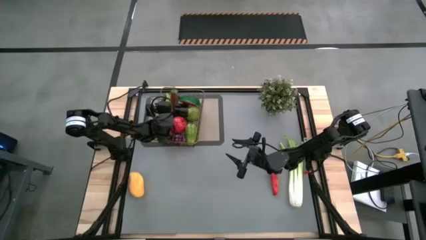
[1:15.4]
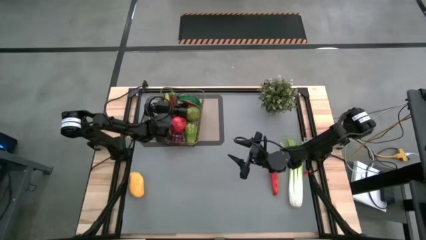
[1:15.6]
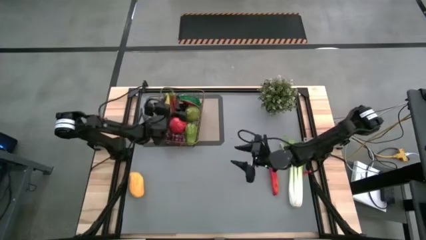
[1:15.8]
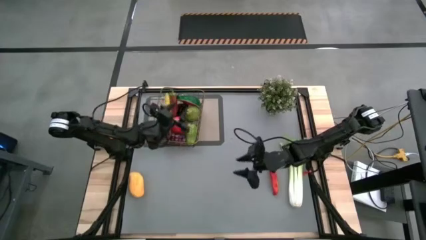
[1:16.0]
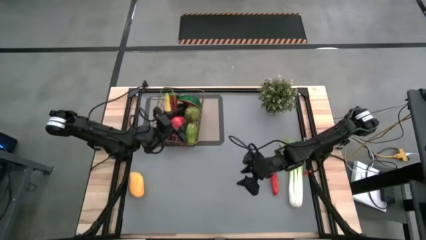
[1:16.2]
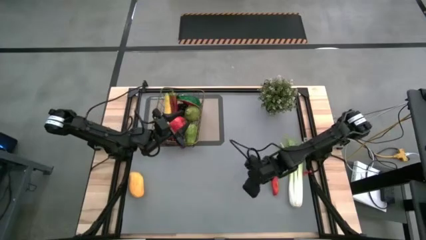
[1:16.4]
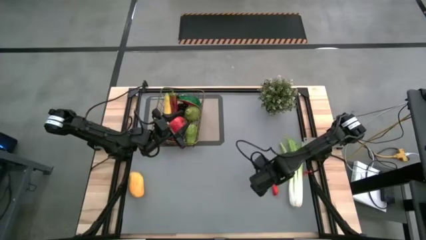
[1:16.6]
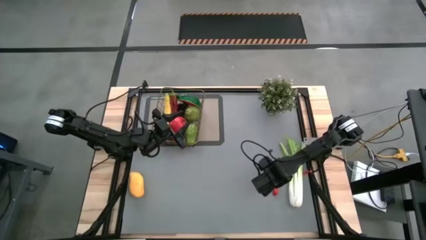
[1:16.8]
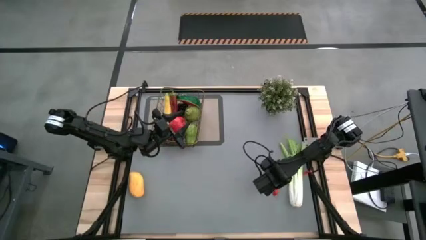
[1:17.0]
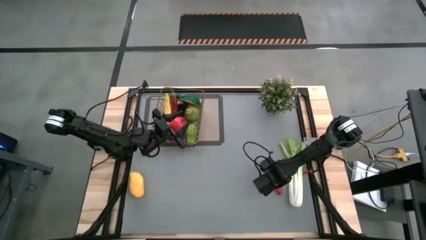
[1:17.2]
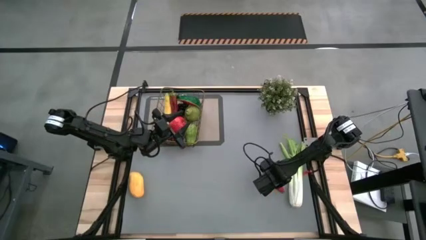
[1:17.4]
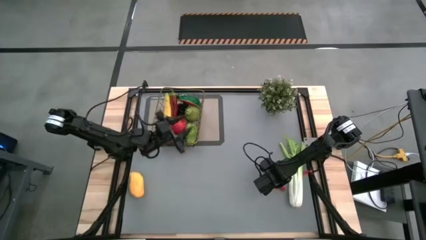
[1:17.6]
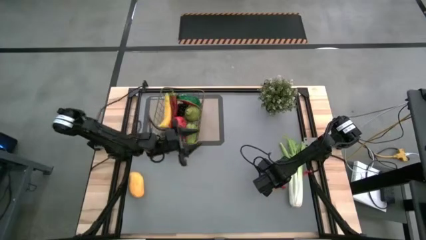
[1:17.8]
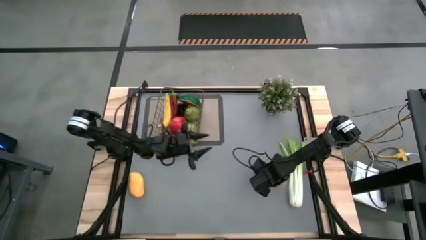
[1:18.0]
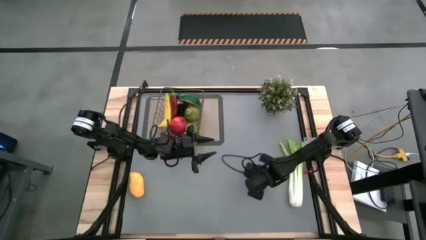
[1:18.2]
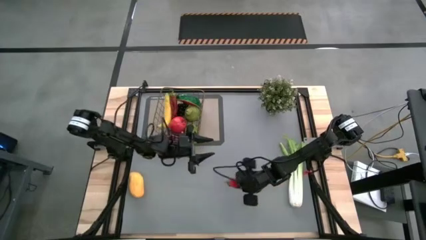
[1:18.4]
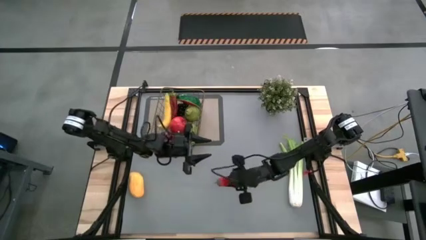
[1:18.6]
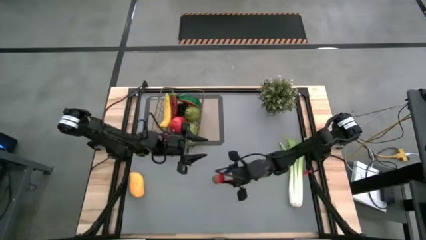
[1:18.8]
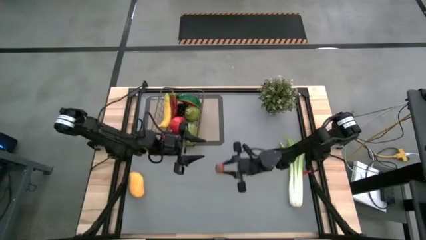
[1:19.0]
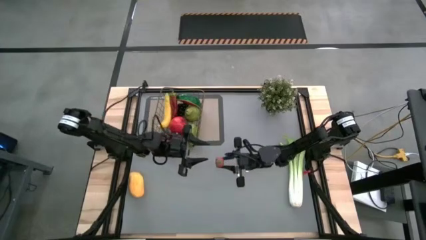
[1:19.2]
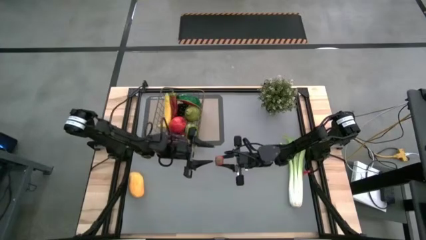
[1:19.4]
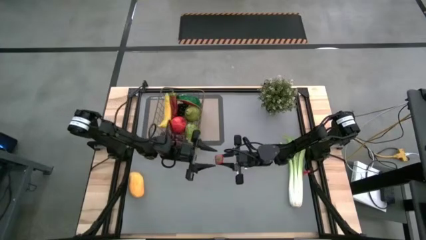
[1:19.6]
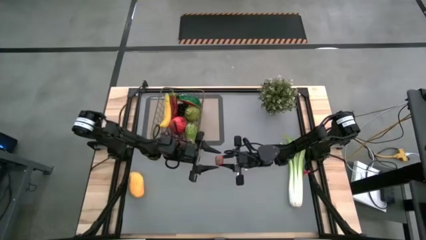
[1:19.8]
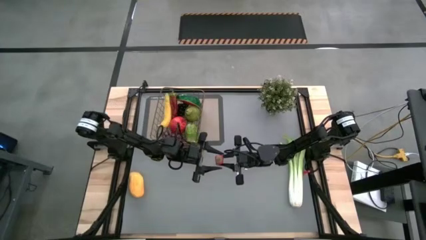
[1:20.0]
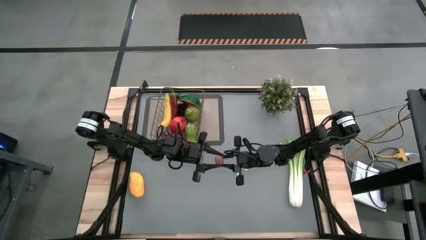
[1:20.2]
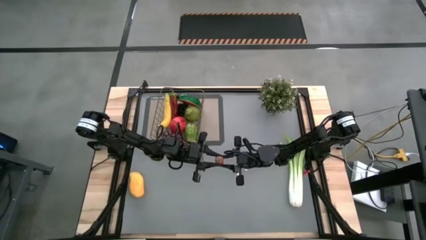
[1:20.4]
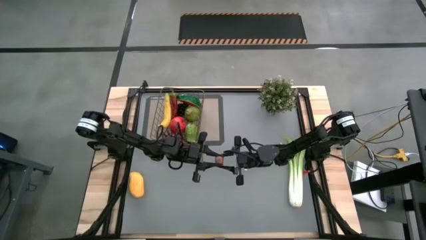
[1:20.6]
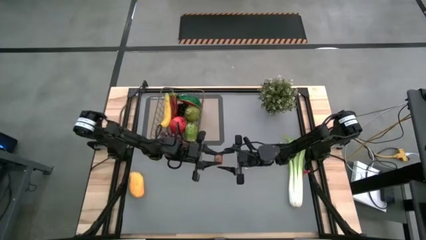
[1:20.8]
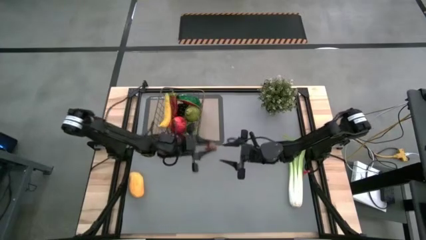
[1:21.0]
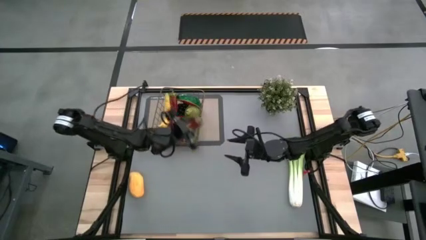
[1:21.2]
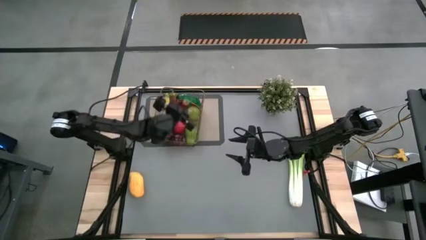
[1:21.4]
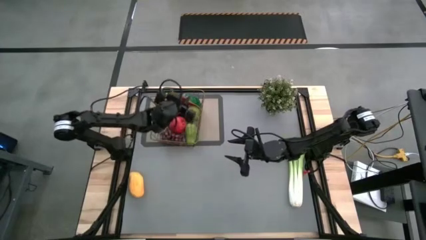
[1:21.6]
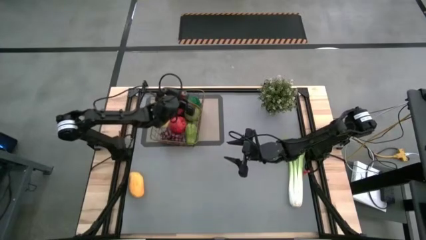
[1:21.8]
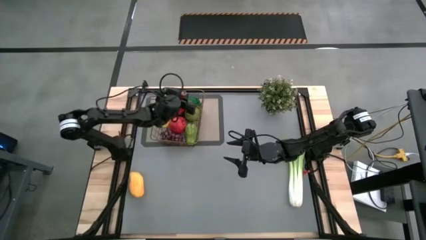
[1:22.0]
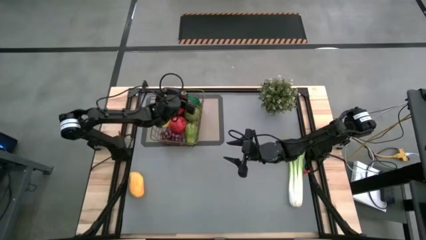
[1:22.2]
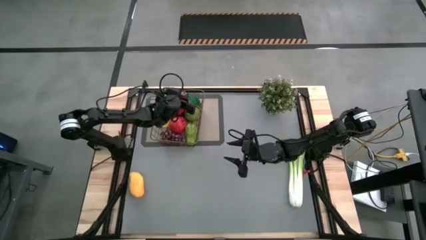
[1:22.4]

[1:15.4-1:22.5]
Task: Build produce basket
Put the red chili pepper into the wire basket

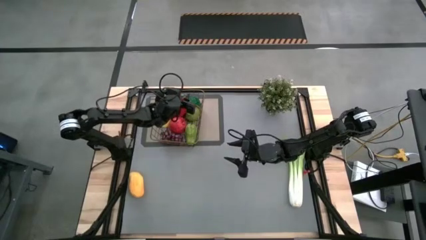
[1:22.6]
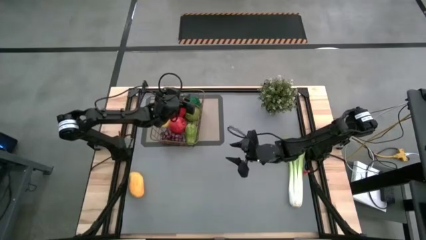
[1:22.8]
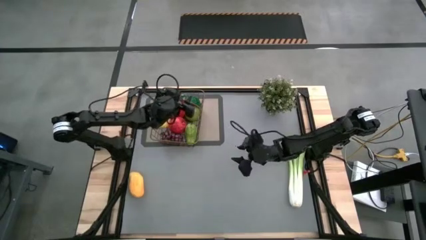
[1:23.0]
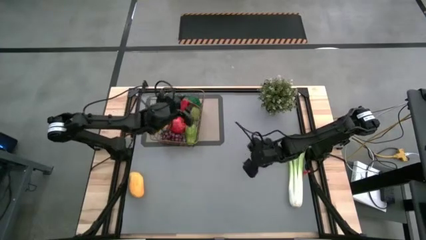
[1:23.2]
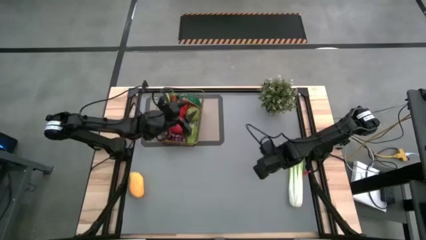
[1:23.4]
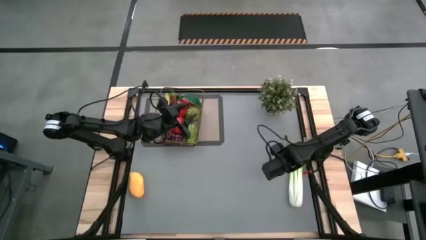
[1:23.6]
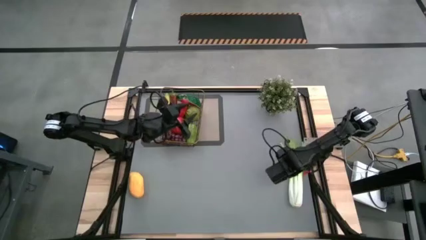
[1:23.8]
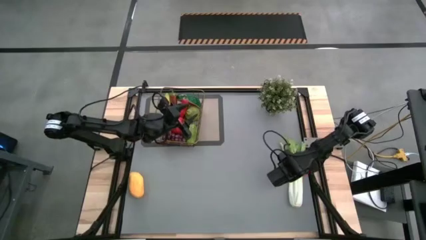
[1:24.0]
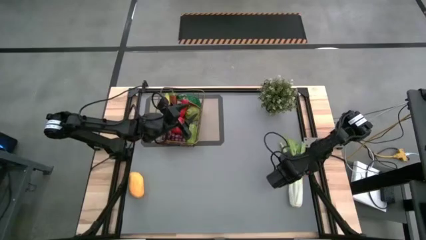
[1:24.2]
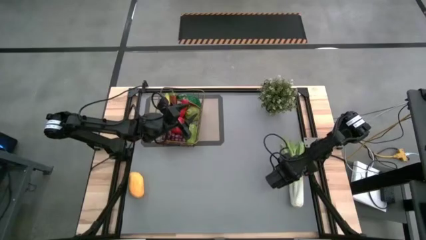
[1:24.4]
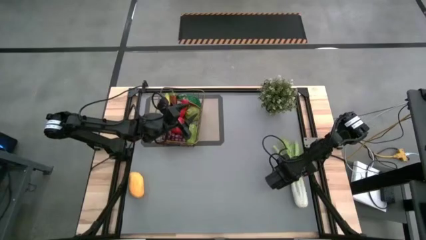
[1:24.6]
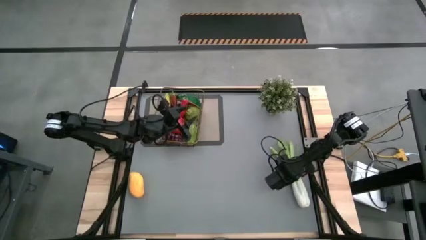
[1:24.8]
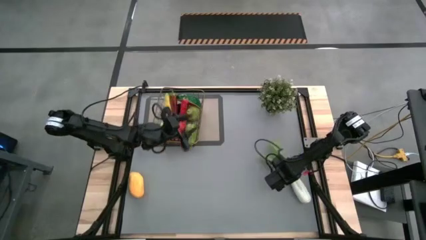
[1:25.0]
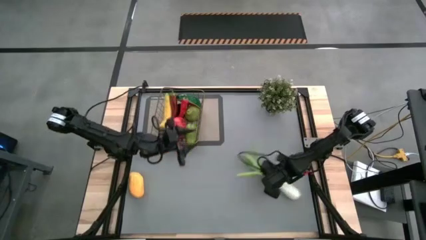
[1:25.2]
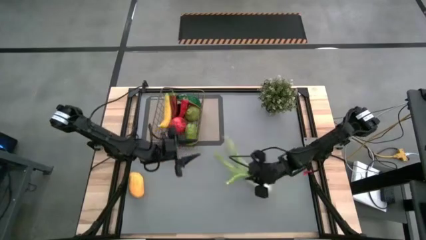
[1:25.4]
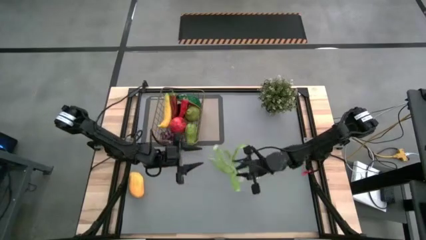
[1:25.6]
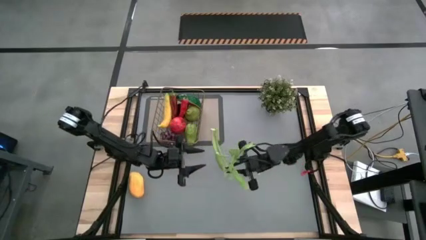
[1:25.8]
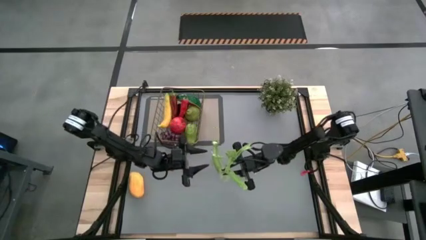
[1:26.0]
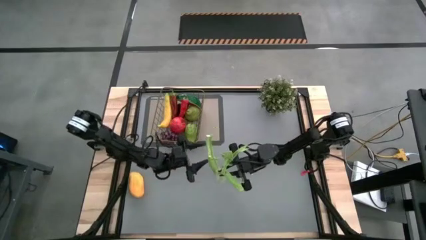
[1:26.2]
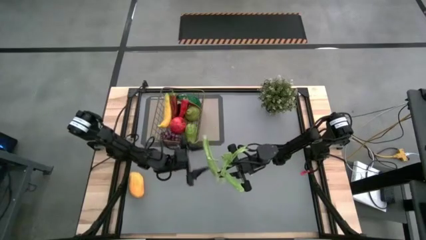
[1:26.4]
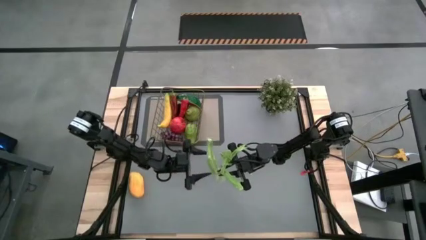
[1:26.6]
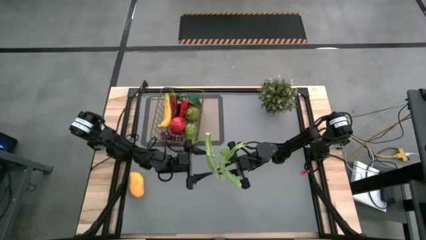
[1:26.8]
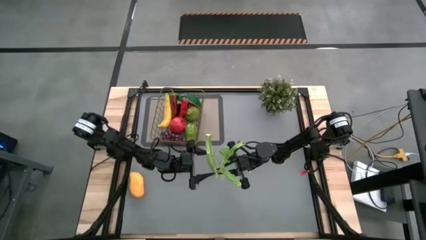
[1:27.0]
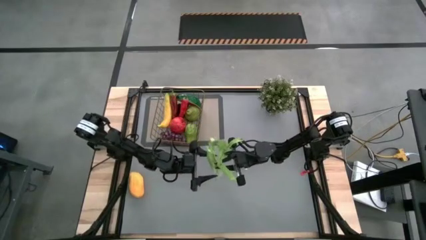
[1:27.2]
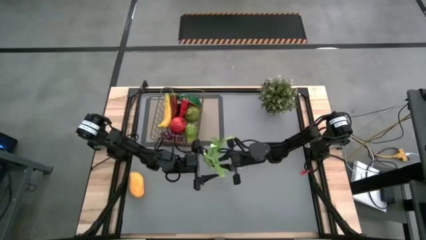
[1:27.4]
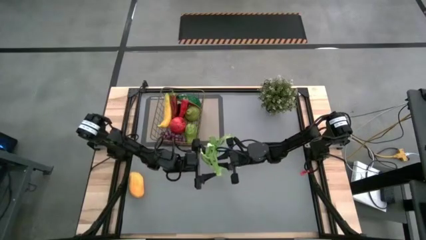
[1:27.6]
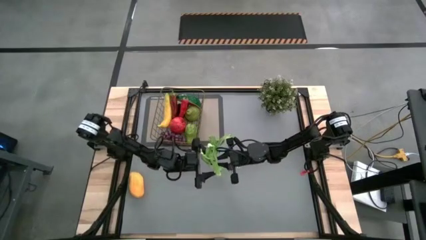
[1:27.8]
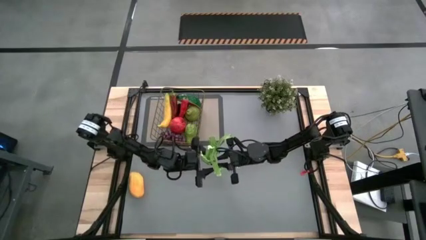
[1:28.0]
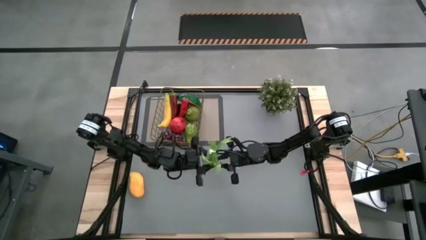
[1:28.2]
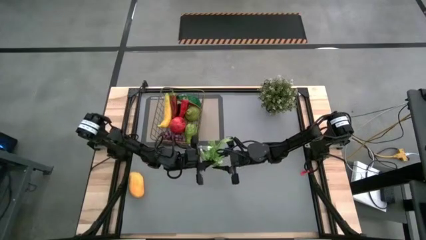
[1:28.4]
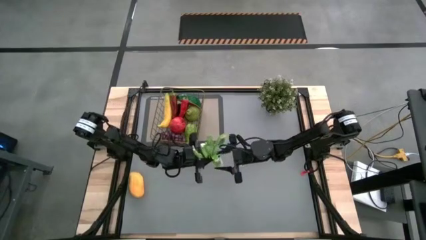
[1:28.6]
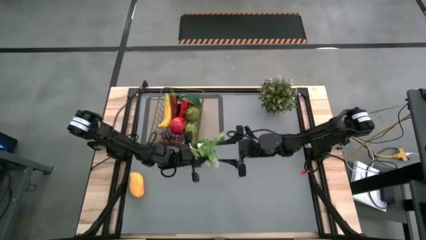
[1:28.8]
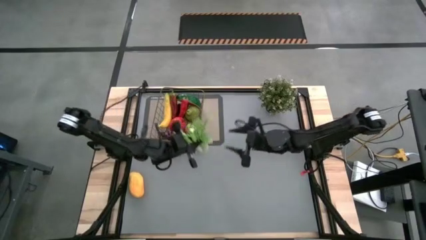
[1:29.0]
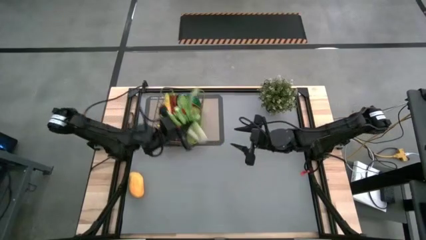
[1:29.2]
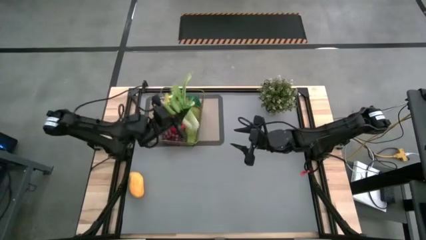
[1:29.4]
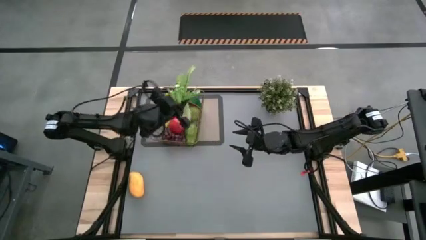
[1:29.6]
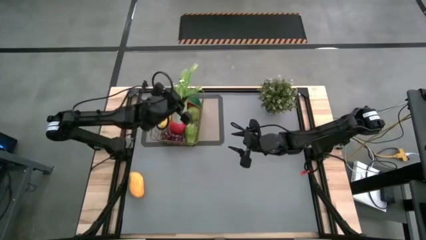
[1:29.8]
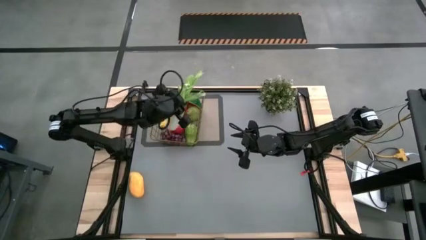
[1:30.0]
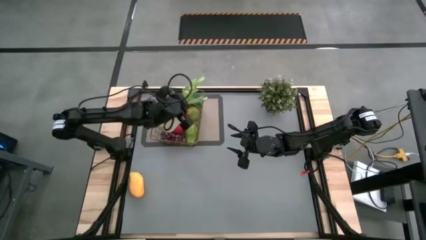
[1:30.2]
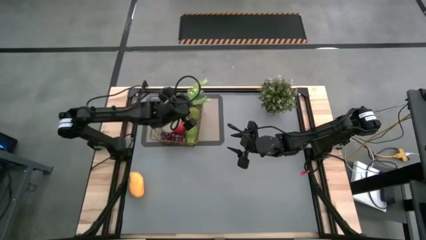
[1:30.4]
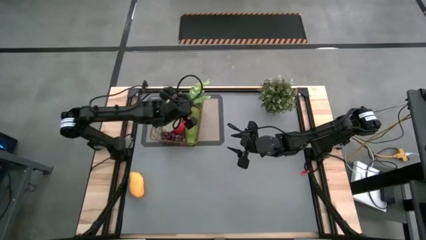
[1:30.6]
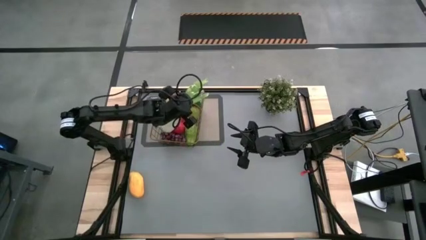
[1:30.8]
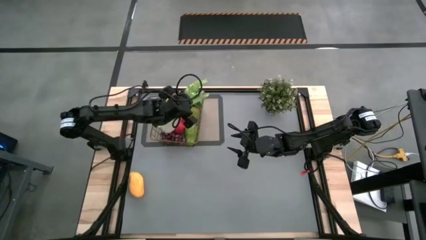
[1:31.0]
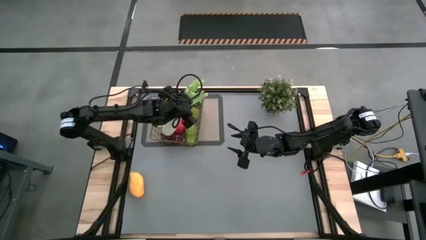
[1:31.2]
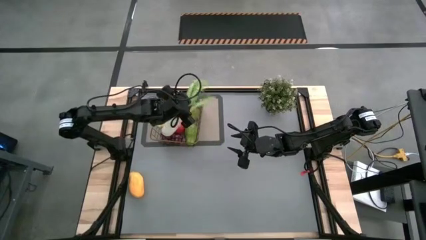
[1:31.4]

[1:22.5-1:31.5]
Put the celery into the wire basket

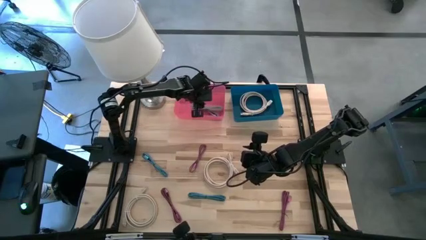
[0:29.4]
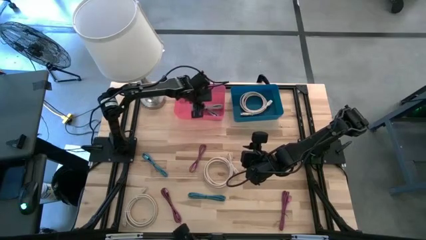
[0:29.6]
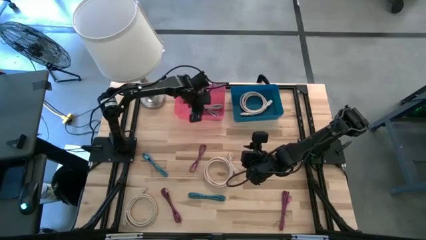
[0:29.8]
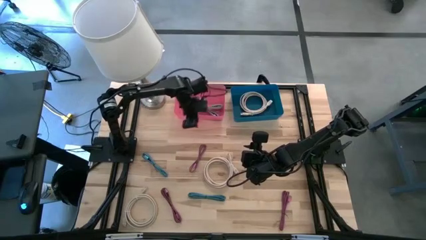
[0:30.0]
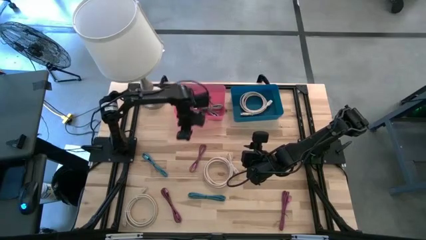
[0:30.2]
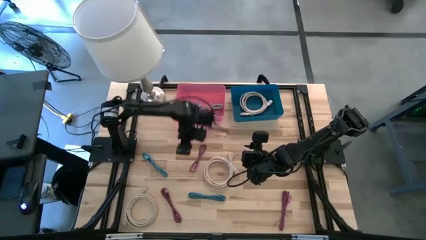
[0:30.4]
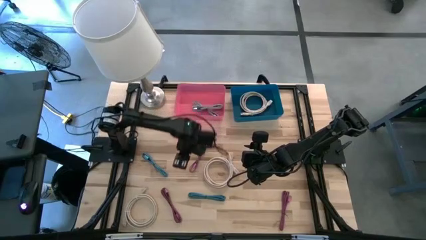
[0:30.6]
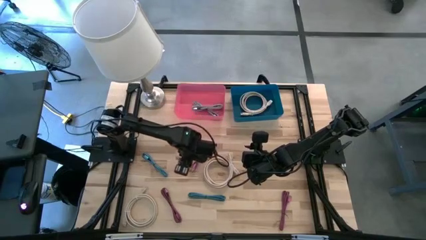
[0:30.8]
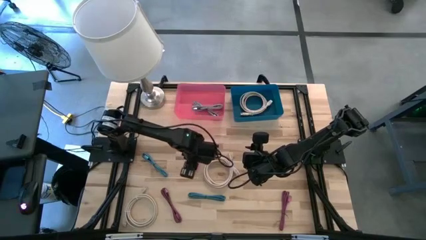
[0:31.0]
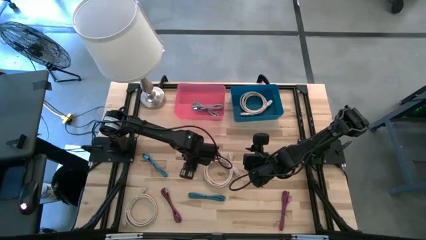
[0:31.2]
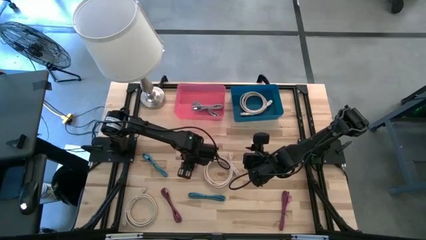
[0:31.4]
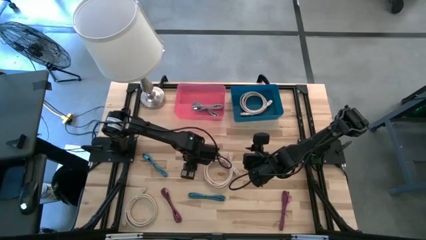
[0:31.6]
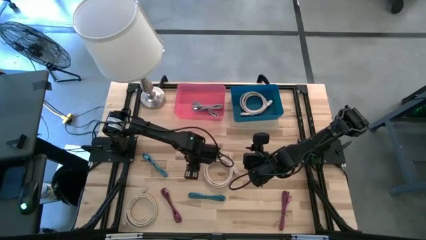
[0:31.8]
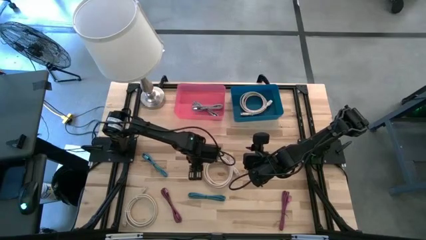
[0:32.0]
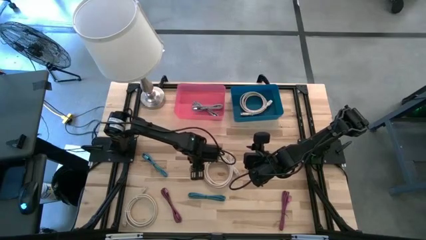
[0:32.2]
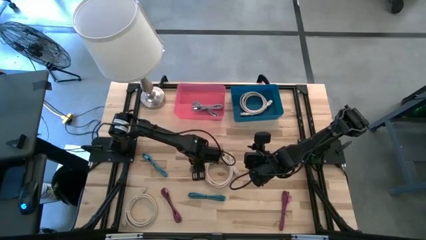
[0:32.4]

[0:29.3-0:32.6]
Task: Pick & Place USB Port
Put the top black and pink charger cable into the red bin
